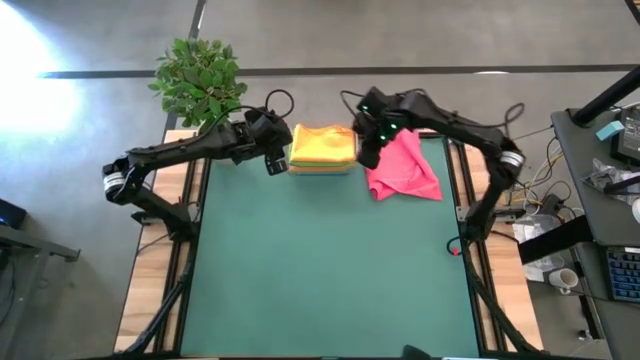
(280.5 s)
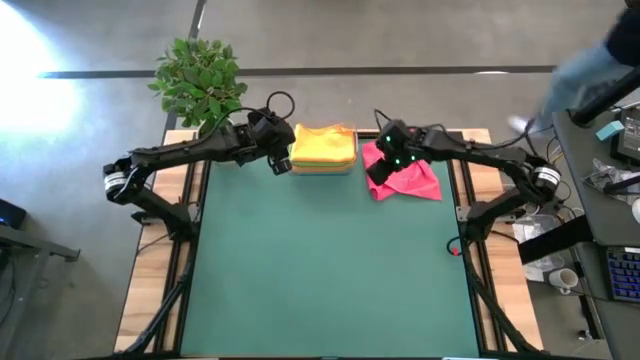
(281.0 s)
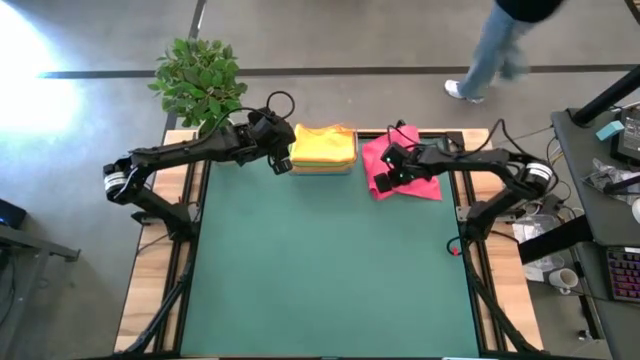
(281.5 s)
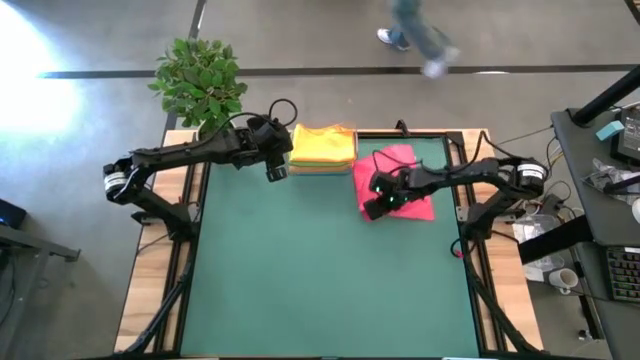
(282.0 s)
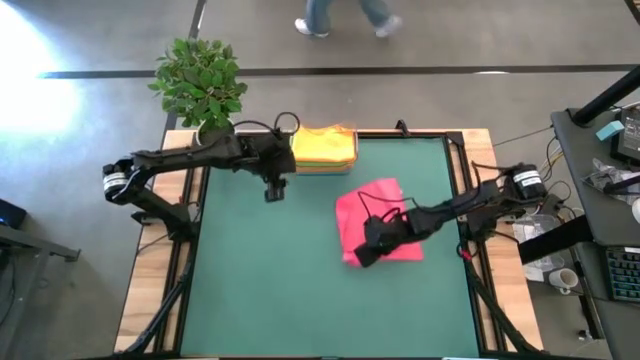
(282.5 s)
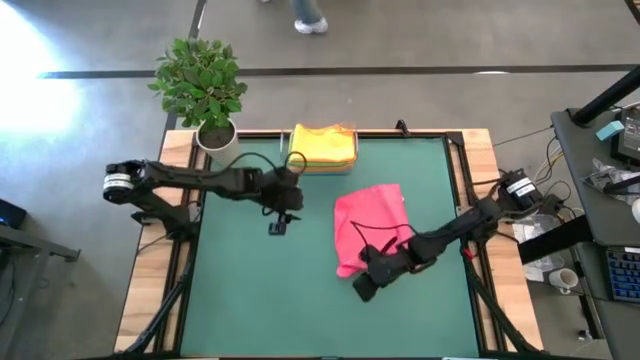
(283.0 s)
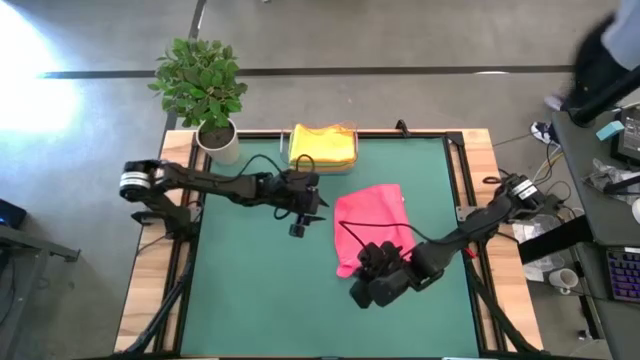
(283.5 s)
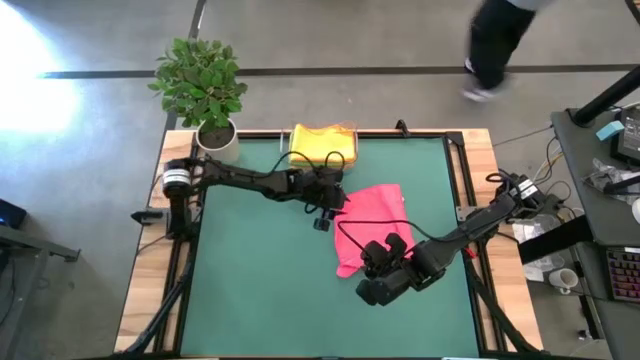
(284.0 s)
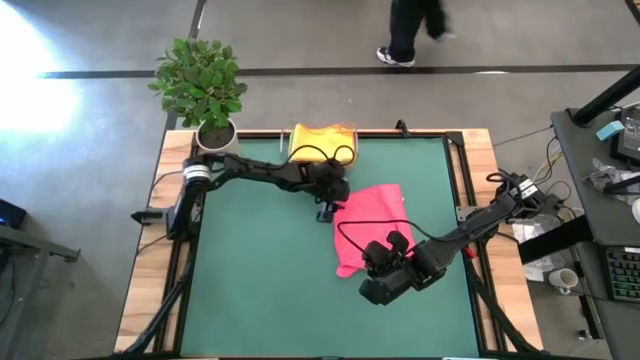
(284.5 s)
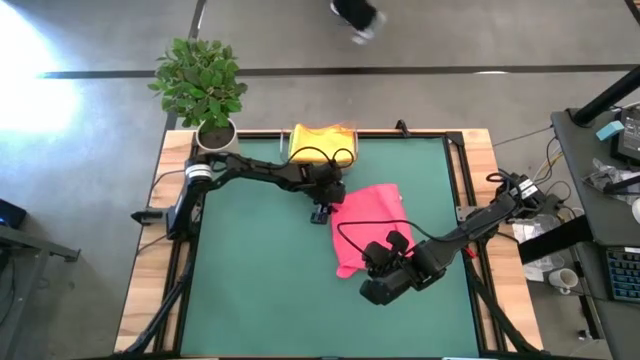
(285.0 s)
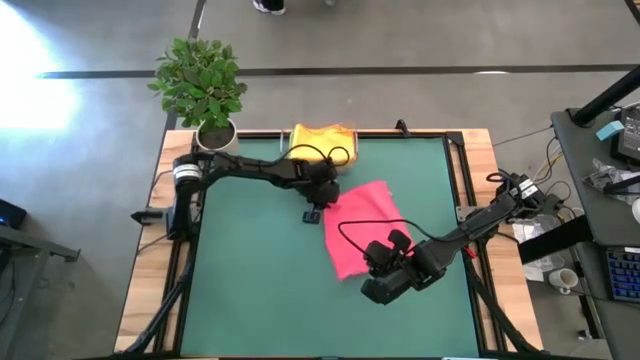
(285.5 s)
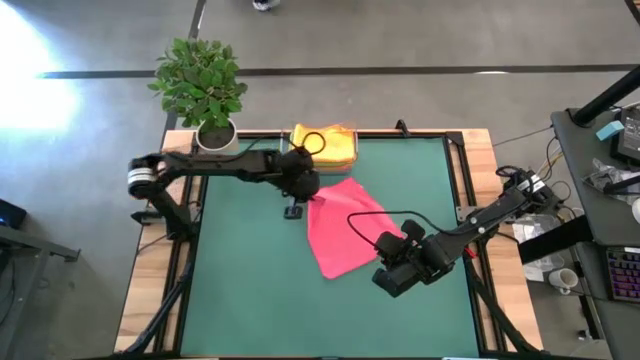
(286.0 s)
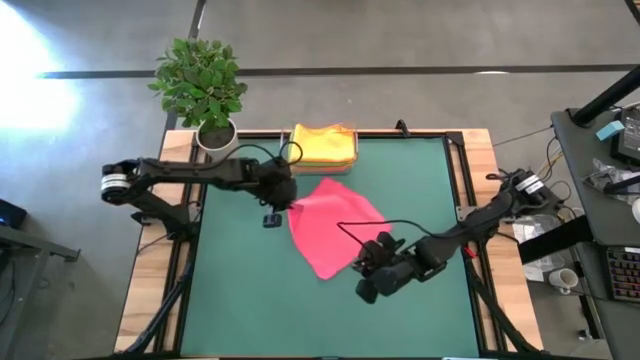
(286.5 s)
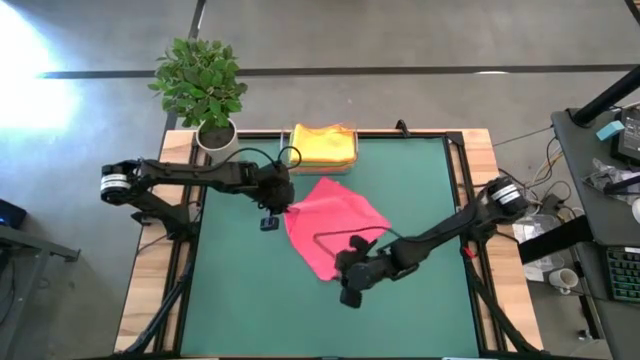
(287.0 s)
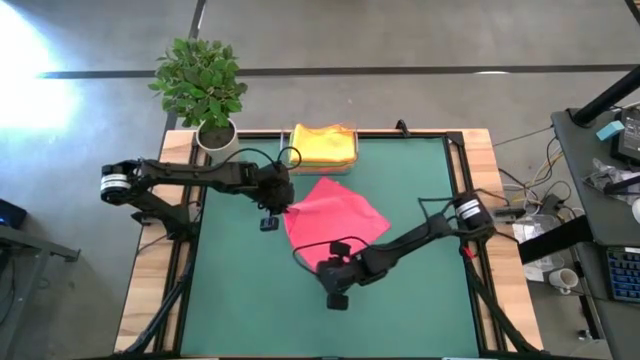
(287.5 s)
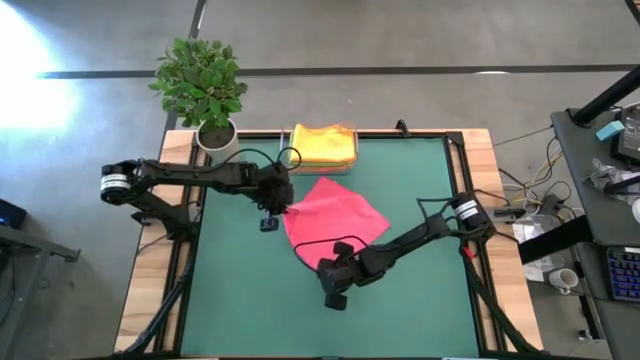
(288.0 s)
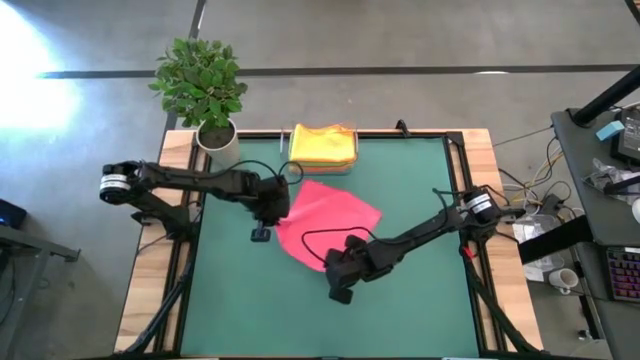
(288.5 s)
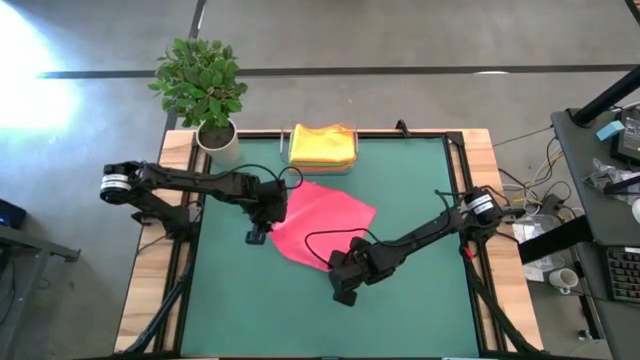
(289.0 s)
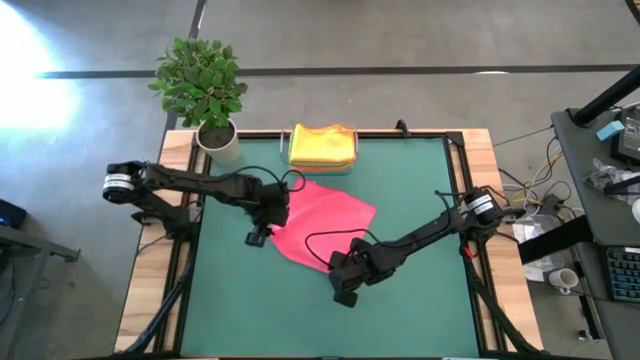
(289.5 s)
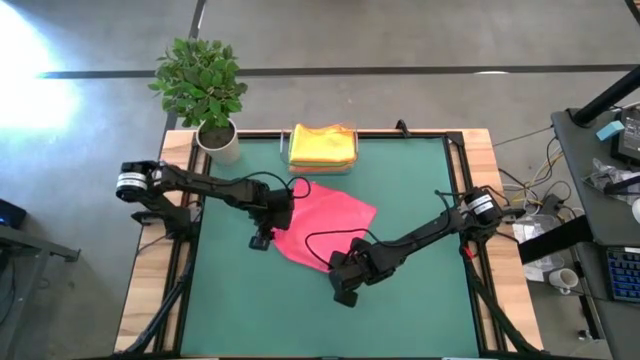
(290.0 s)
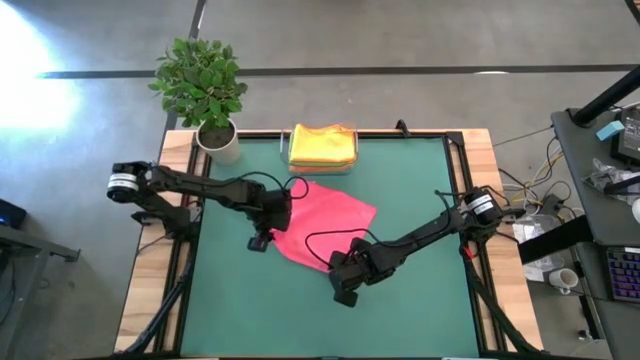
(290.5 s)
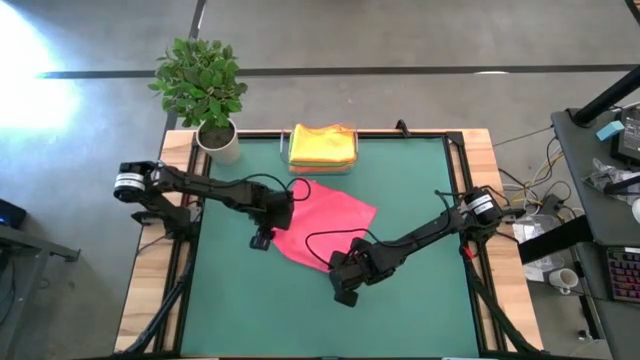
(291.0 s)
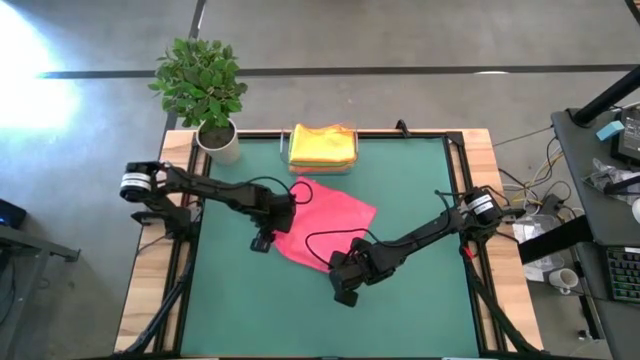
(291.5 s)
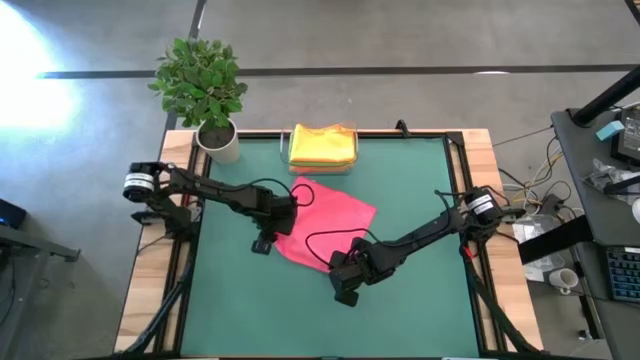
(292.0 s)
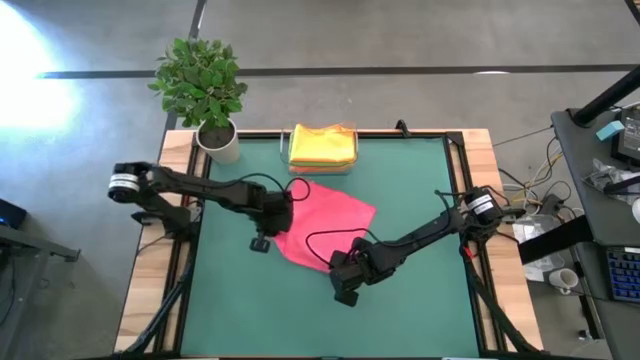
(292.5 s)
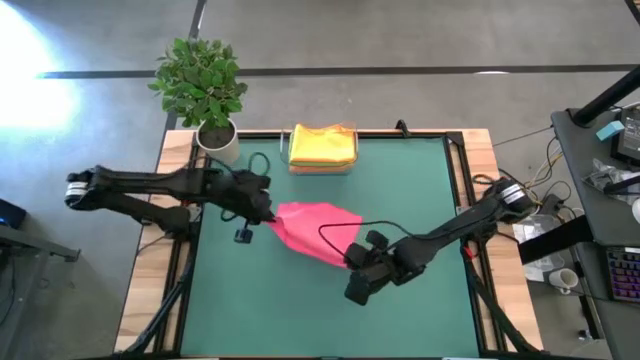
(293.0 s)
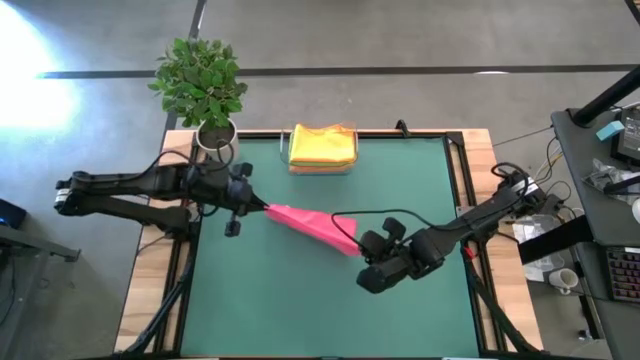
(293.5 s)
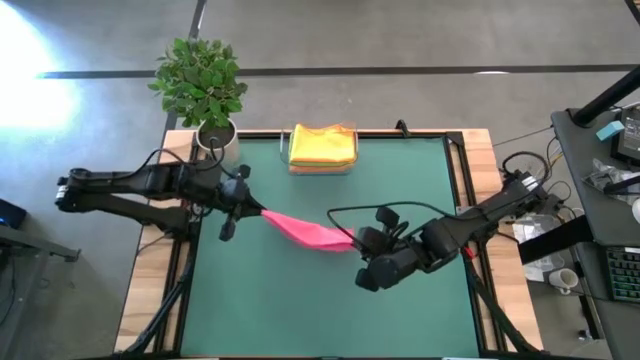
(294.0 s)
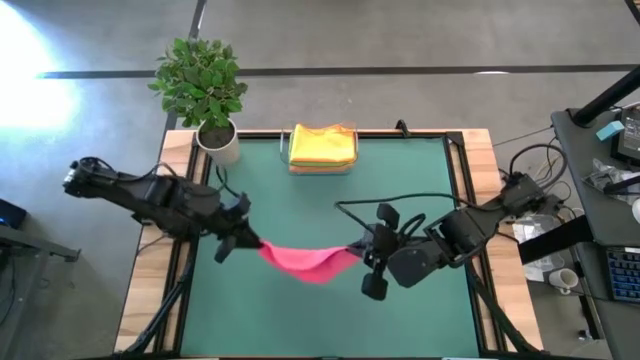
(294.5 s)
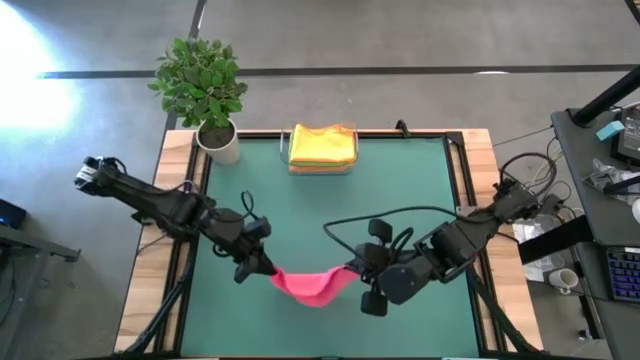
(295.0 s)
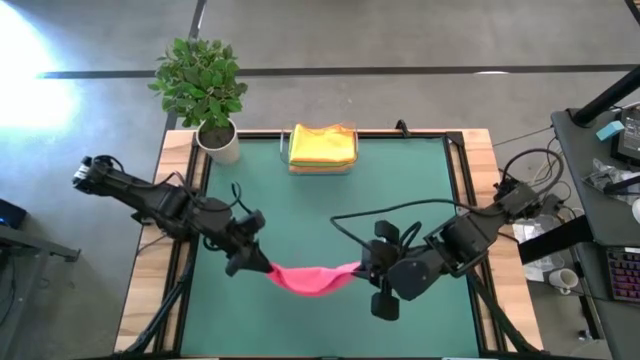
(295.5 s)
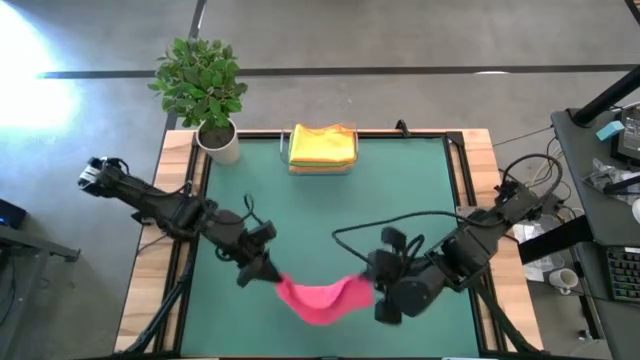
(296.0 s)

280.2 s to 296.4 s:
Task: Fold microfiber towels
Fold the pink microfiber towel
